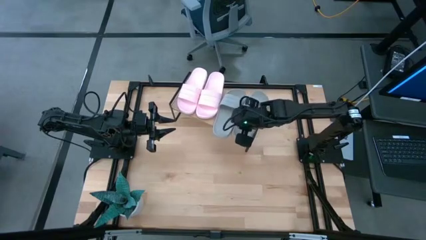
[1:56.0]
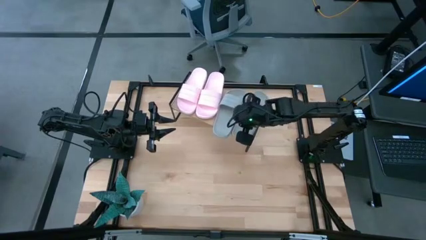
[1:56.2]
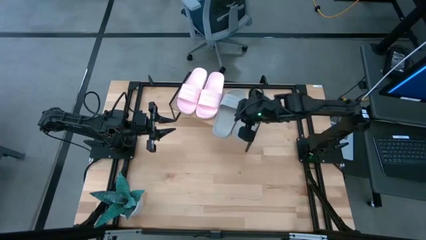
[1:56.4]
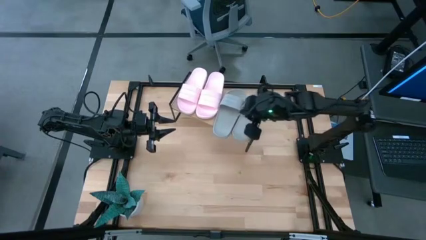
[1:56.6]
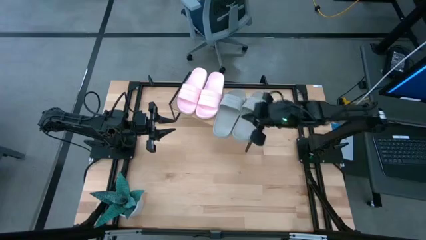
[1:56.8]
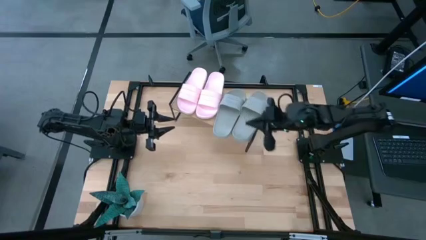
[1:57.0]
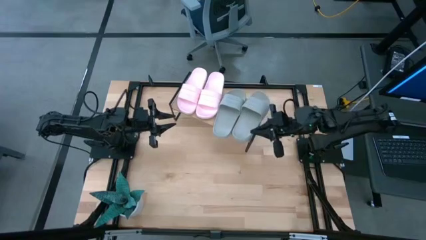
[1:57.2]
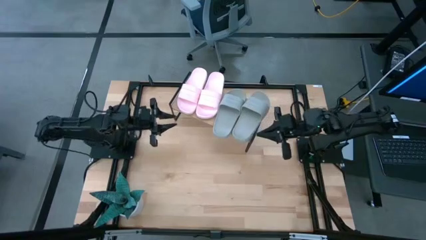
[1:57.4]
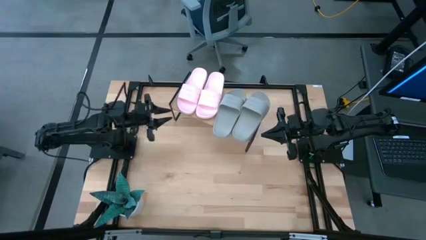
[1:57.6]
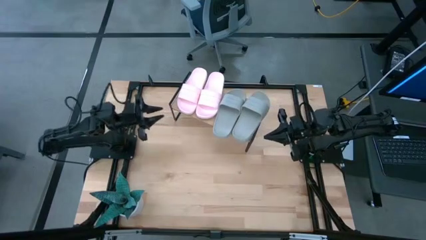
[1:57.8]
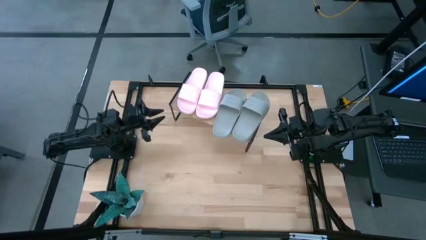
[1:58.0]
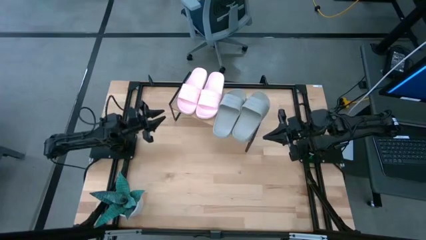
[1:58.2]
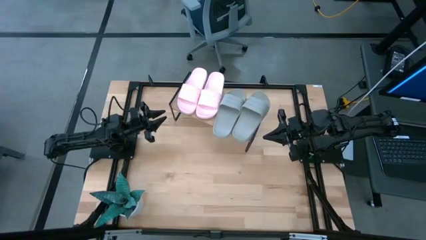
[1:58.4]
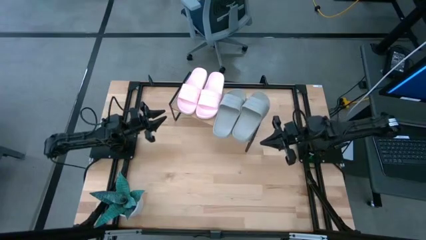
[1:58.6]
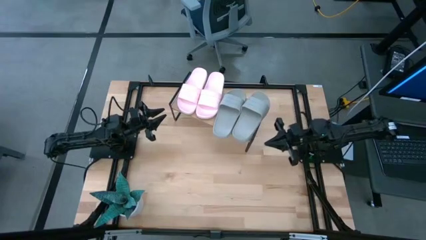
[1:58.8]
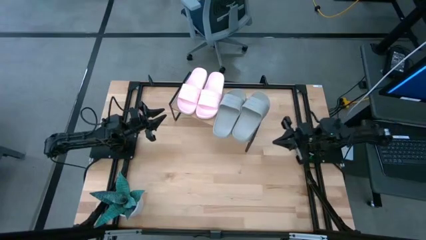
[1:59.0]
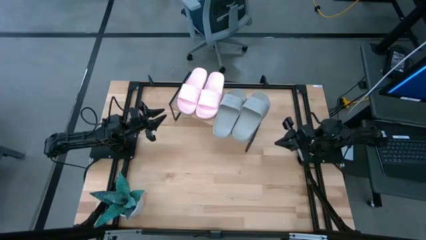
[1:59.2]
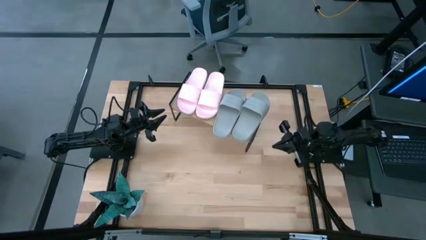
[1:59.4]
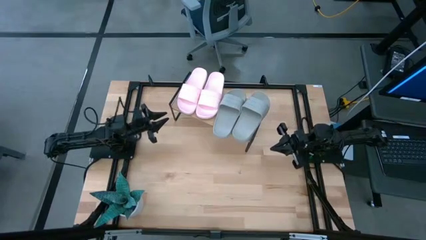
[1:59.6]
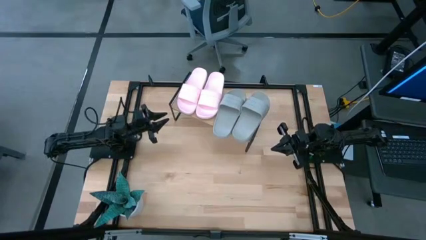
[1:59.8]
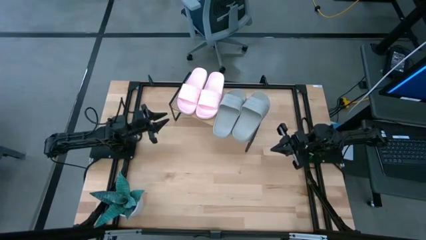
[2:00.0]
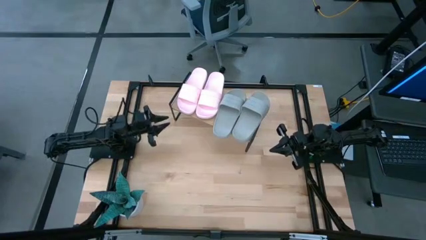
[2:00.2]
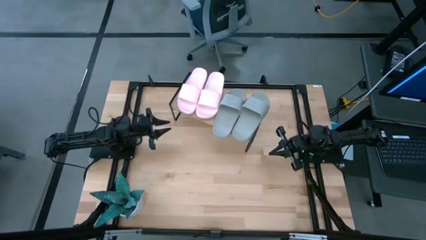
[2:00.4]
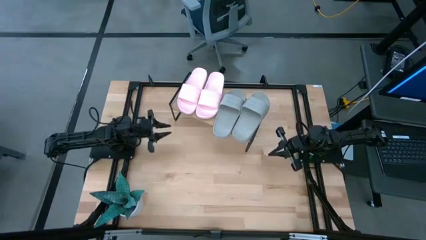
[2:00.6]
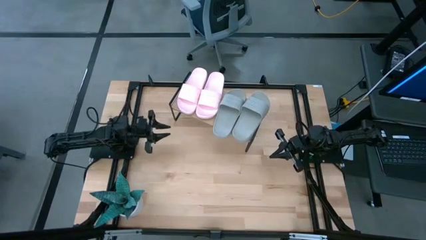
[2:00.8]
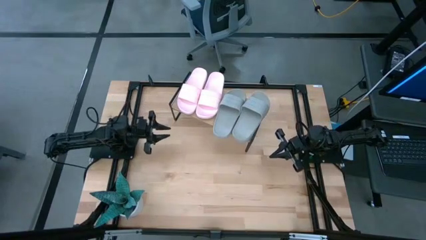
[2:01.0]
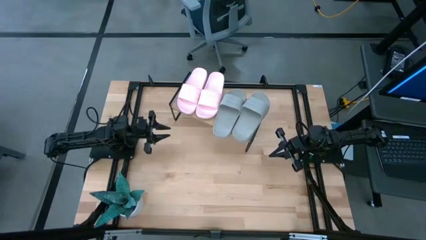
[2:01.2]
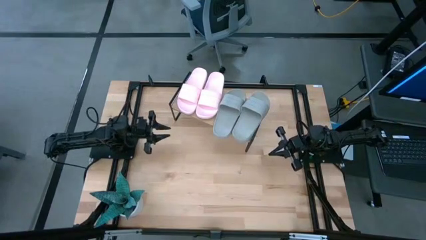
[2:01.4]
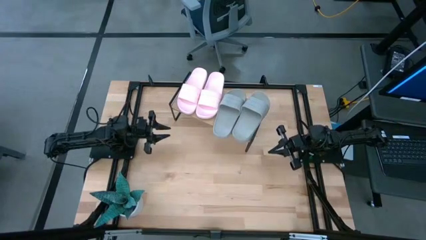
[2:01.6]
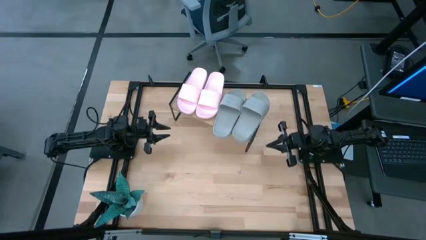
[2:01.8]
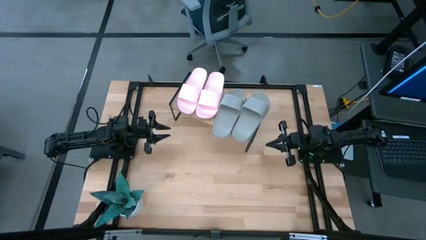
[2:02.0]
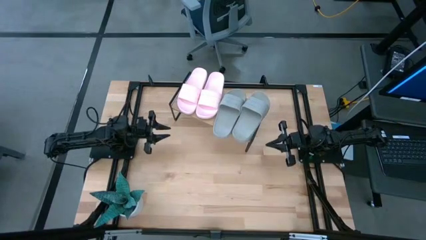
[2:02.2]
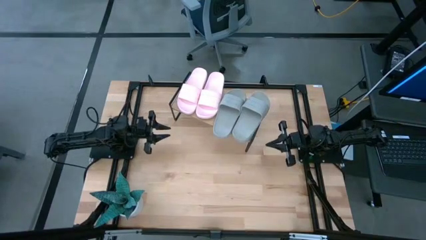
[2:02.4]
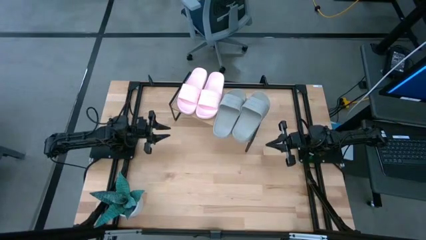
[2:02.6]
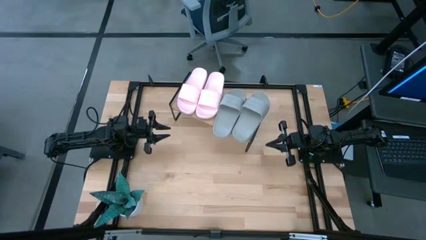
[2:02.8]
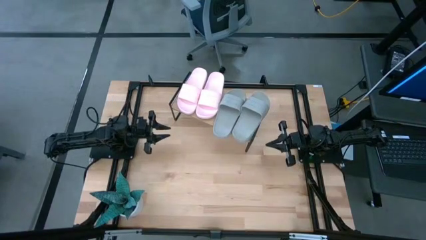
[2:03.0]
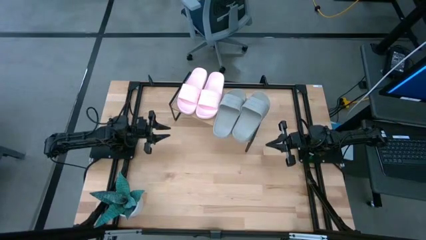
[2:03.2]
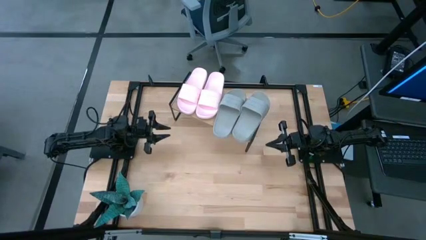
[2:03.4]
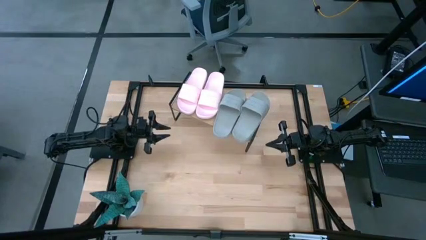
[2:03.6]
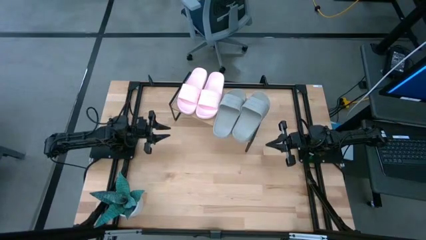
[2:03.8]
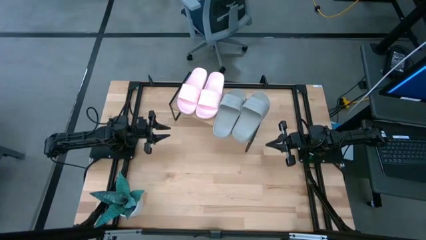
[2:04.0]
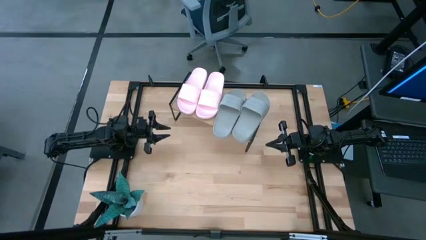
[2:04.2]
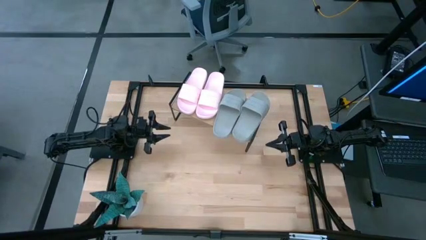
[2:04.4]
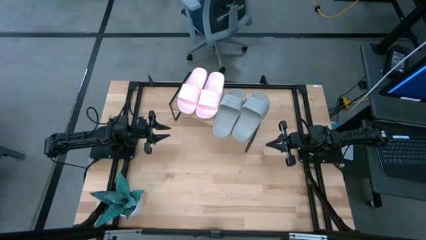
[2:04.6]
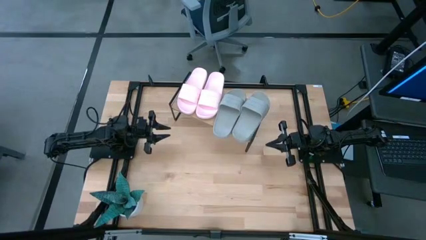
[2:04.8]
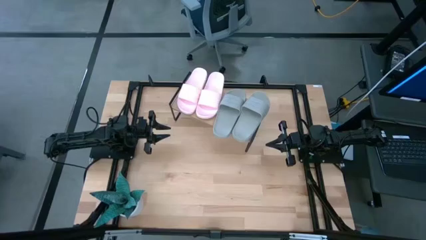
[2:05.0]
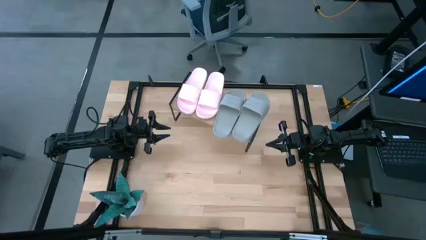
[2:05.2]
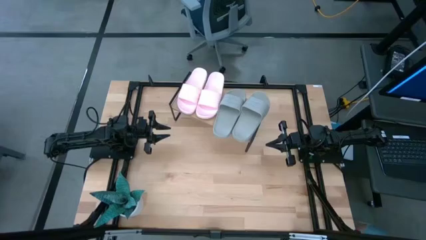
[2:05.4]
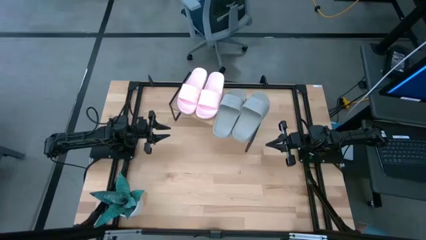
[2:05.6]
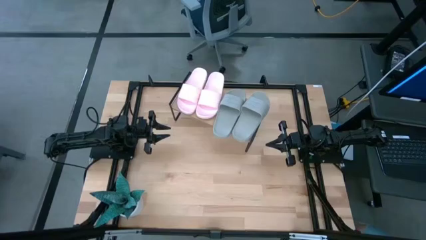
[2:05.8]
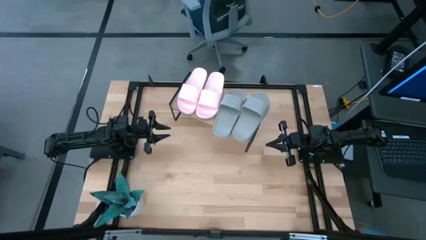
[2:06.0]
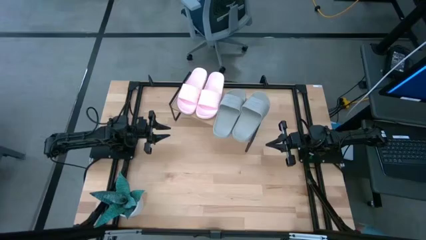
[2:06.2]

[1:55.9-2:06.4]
Task: Pick and place slides into the shelf
Return to Home Position

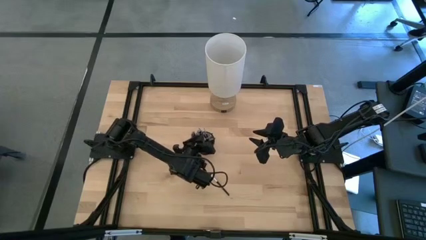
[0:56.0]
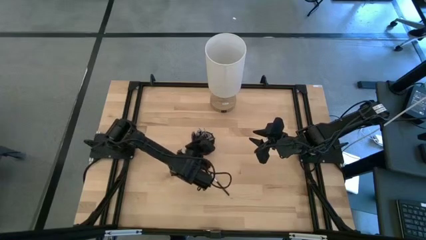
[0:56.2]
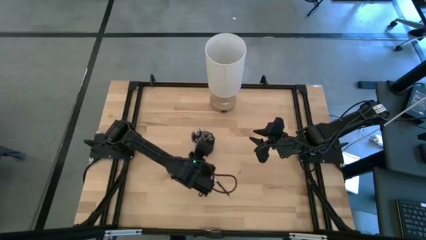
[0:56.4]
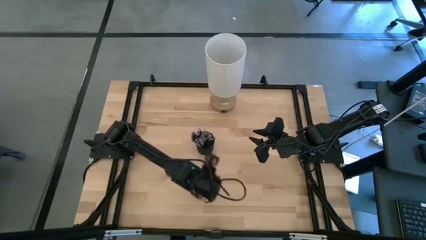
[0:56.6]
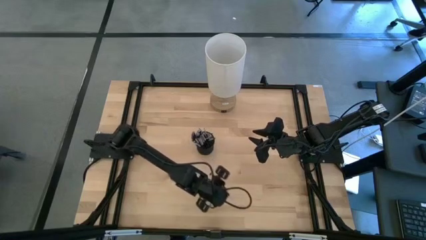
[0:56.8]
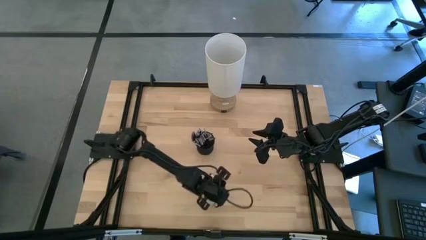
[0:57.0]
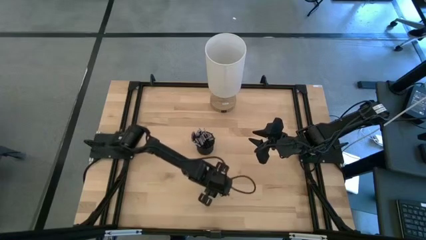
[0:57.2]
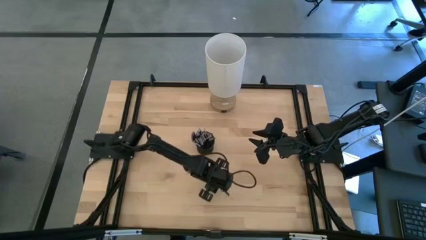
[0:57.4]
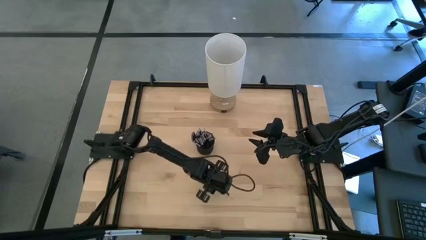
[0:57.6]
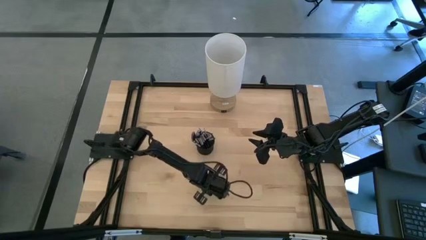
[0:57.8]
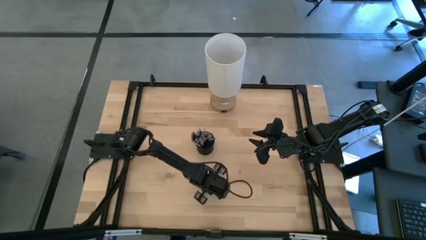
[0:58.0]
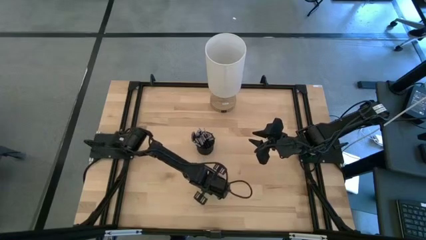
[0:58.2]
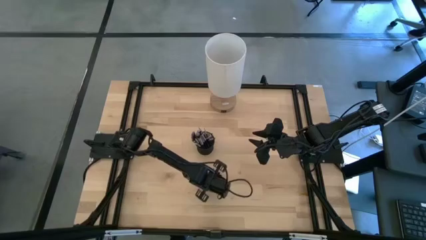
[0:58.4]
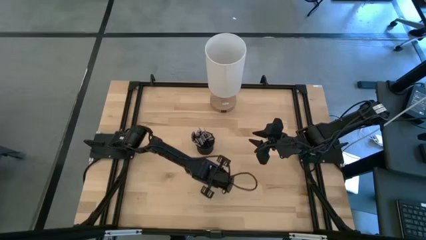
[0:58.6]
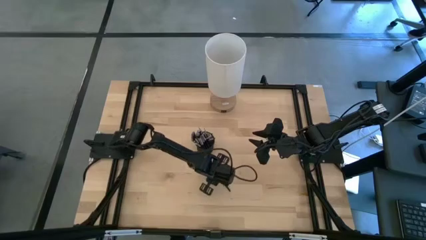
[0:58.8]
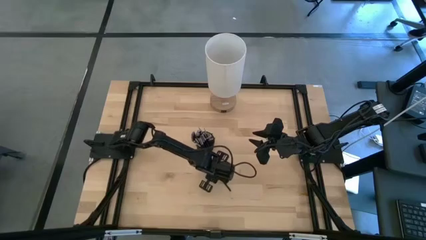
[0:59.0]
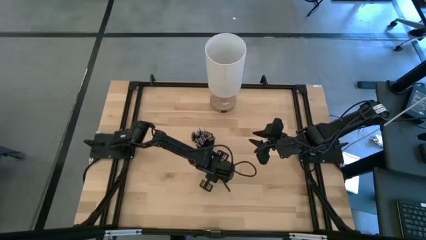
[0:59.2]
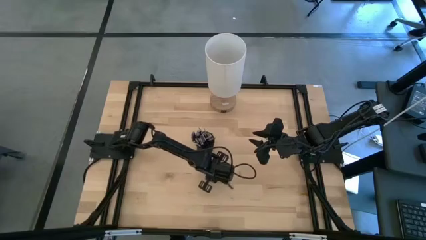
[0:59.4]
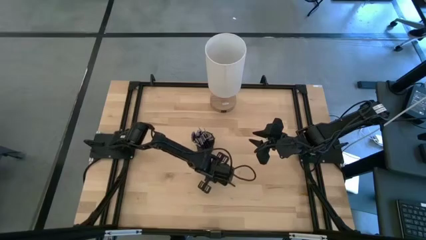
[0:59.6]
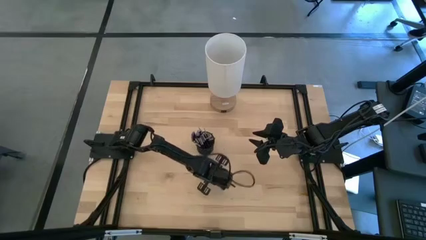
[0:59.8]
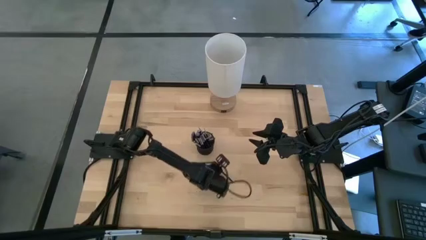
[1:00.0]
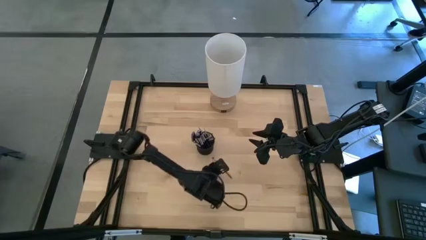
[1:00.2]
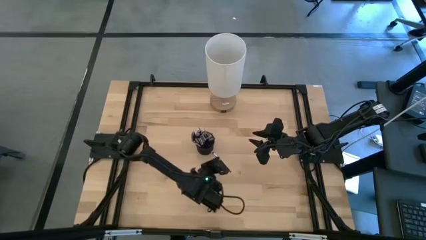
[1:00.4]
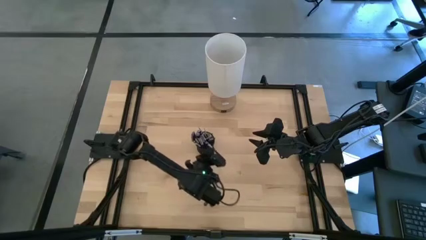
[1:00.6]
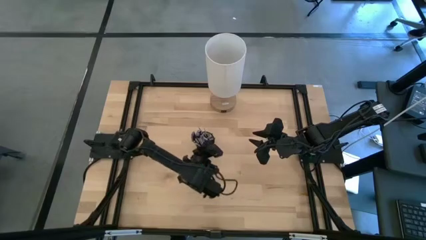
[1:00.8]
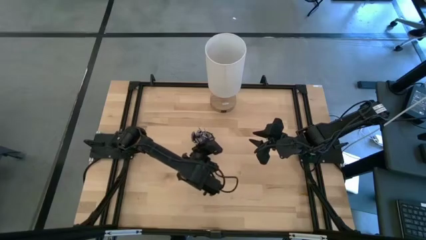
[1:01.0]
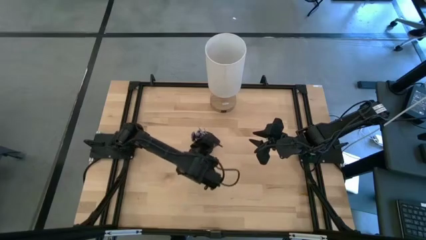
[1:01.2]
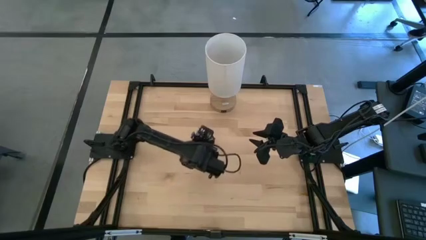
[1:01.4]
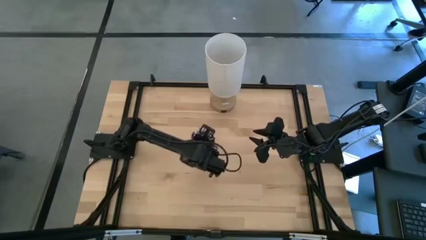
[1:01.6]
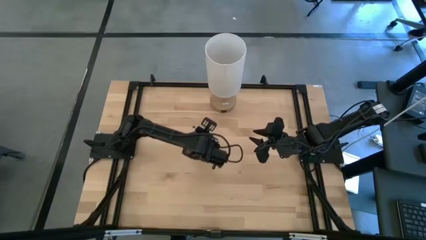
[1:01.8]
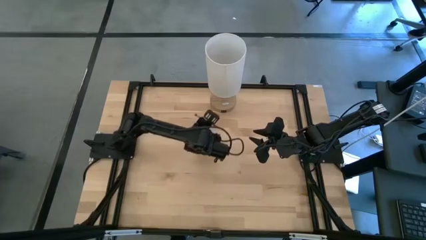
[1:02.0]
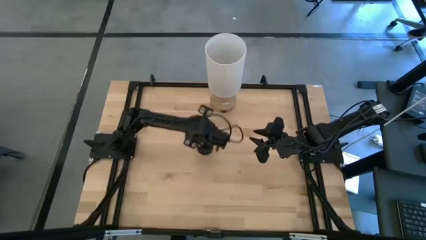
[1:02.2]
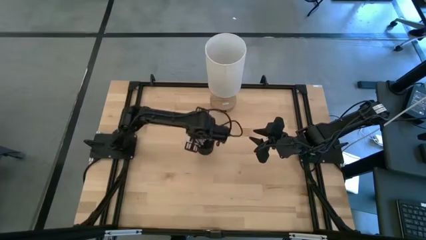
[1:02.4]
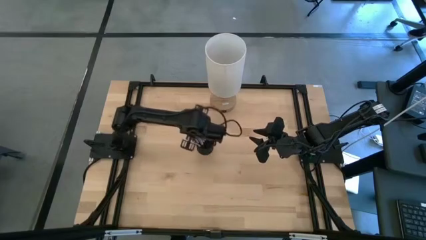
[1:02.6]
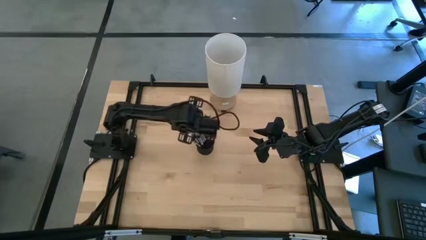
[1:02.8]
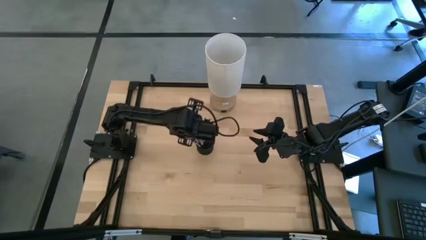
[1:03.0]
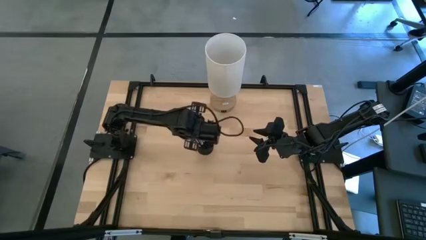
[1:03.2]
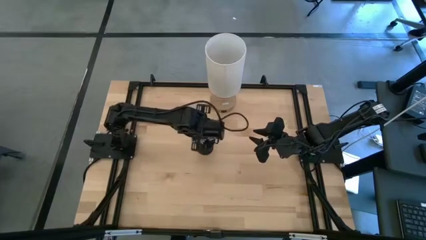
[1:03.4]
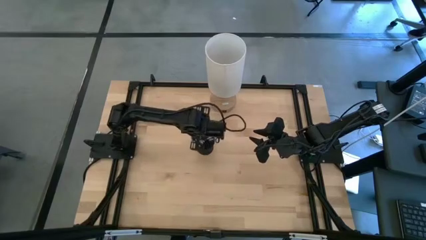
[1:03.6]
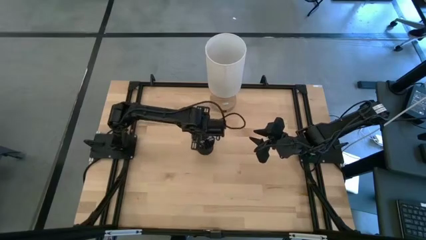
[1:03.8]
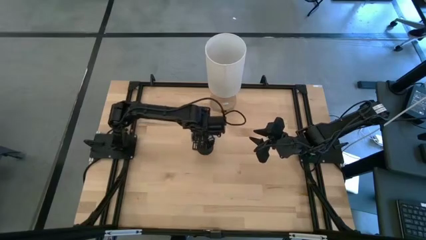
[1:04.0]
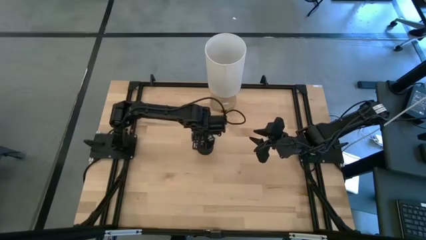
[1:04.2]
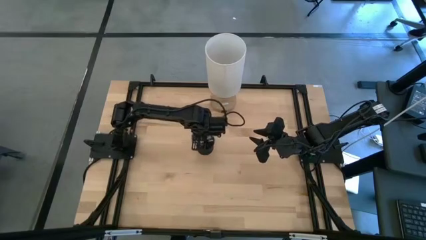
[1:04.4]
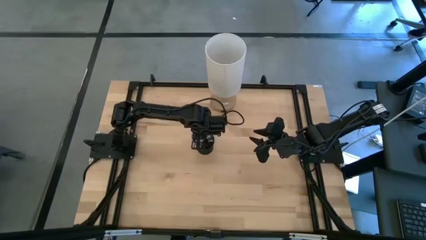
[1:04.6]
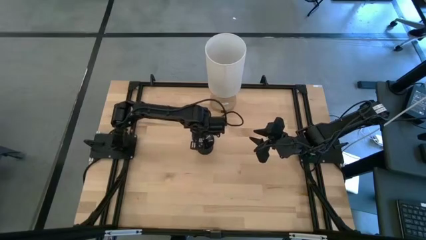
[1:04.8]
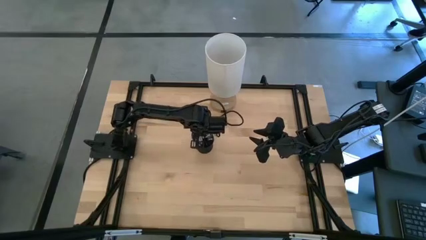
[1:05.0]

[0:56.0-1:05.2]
Task: Put items in baskets/containers
Put the eyeshadow brush into the holder
